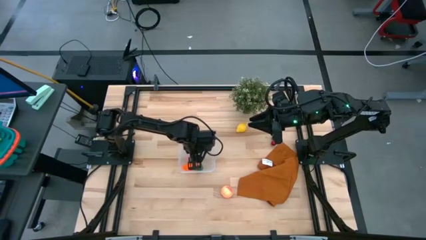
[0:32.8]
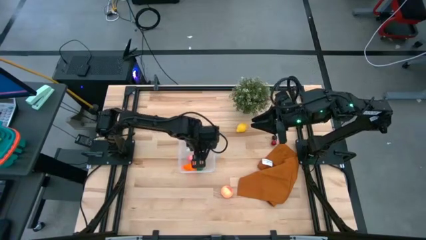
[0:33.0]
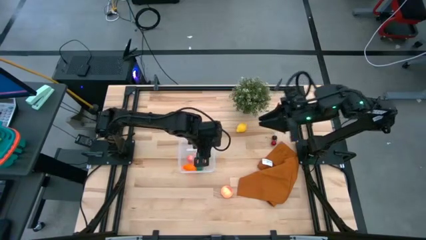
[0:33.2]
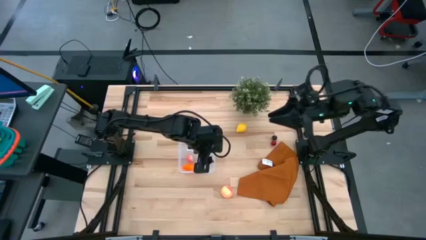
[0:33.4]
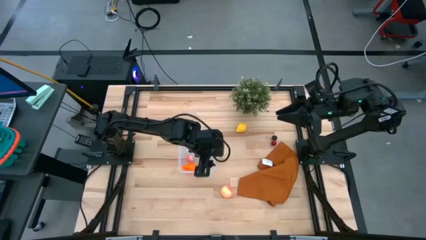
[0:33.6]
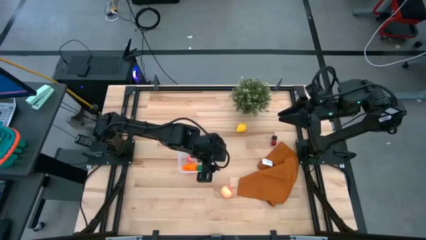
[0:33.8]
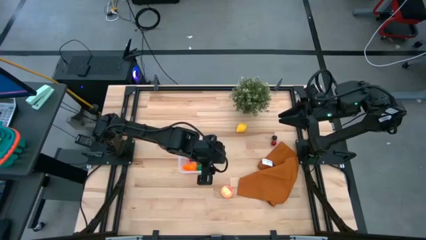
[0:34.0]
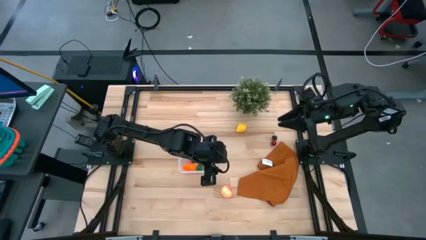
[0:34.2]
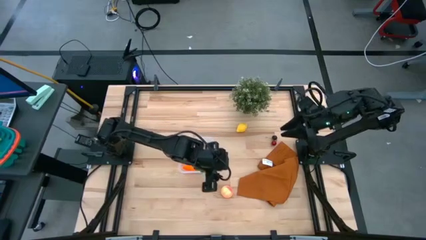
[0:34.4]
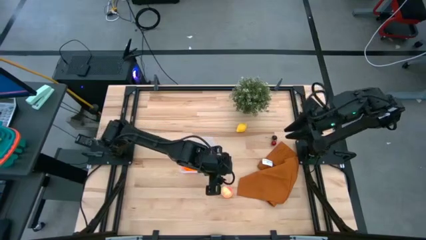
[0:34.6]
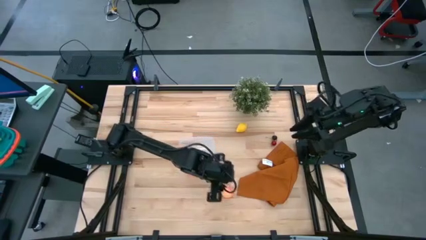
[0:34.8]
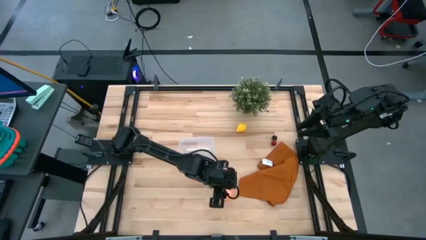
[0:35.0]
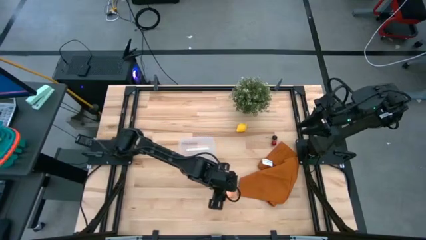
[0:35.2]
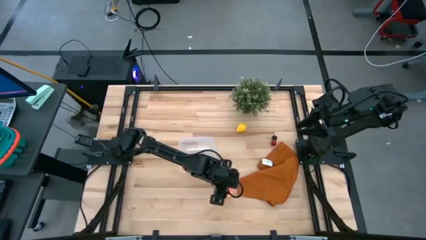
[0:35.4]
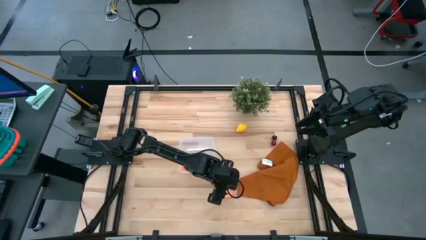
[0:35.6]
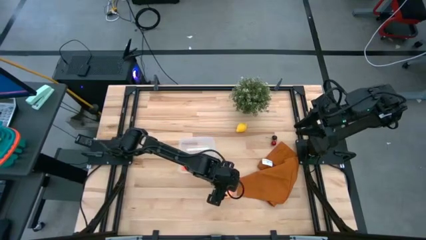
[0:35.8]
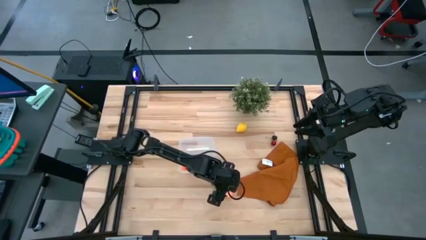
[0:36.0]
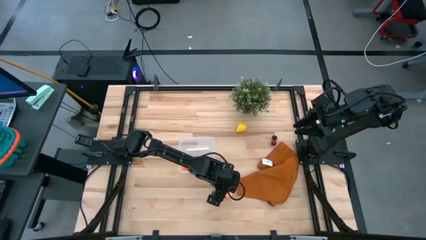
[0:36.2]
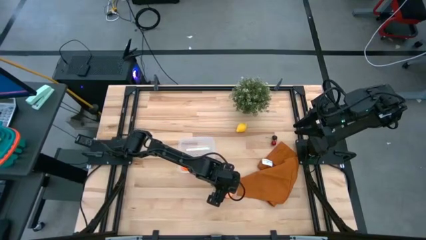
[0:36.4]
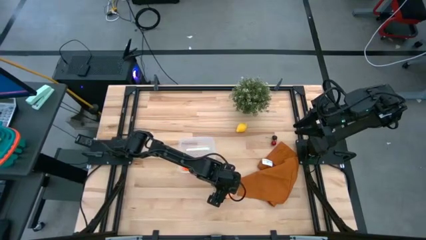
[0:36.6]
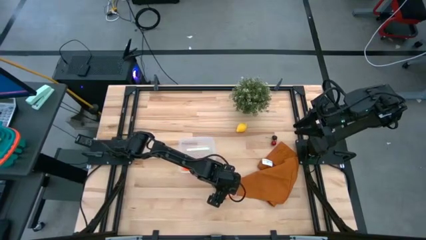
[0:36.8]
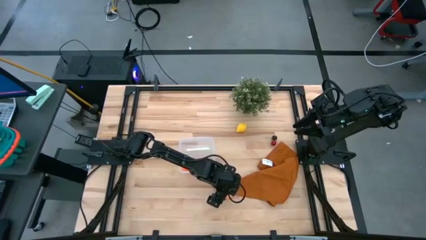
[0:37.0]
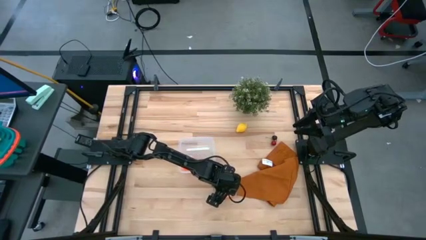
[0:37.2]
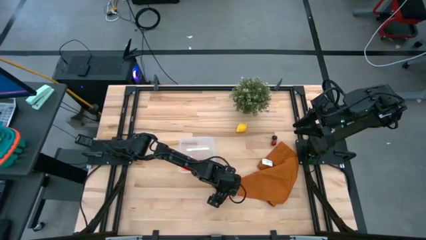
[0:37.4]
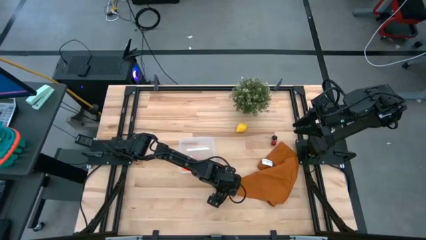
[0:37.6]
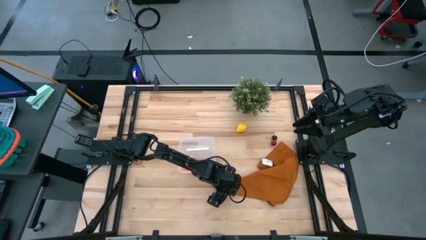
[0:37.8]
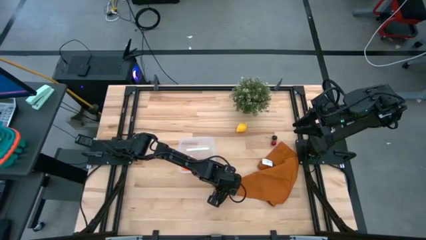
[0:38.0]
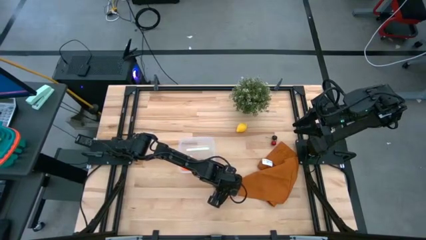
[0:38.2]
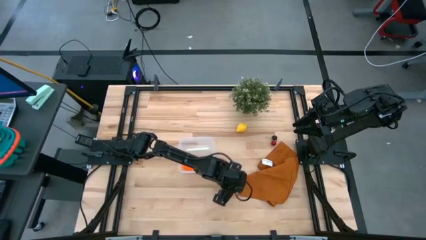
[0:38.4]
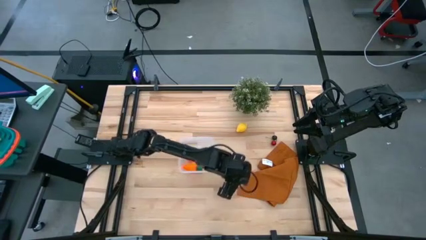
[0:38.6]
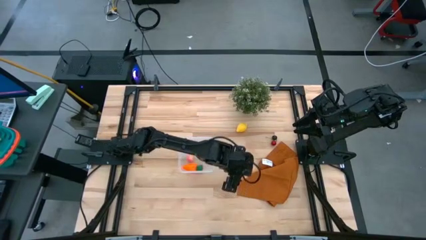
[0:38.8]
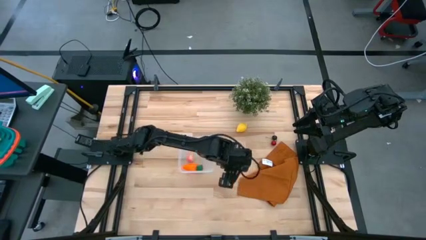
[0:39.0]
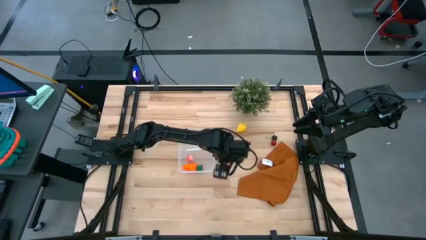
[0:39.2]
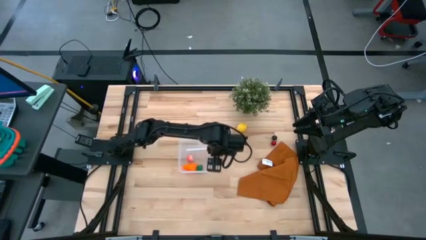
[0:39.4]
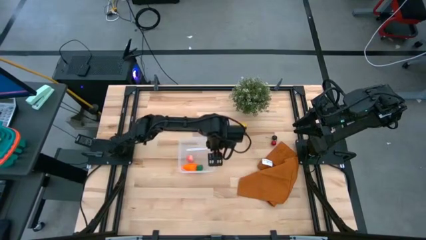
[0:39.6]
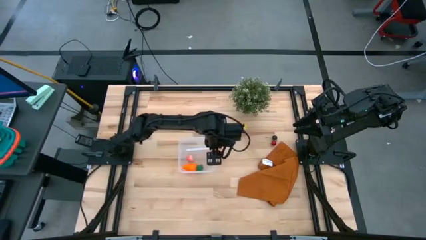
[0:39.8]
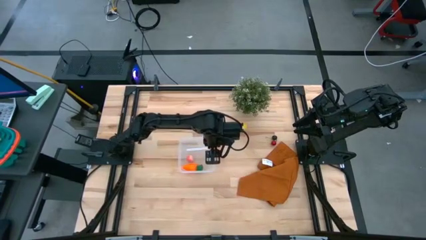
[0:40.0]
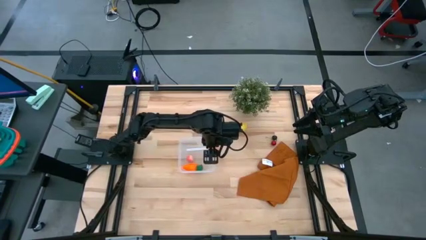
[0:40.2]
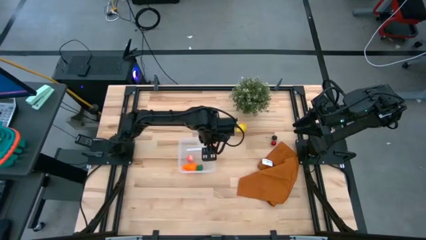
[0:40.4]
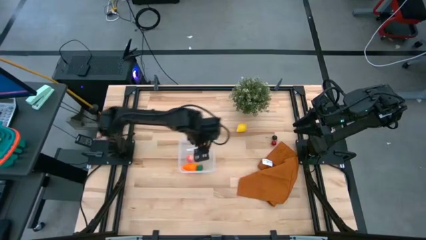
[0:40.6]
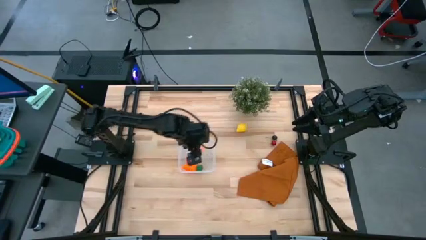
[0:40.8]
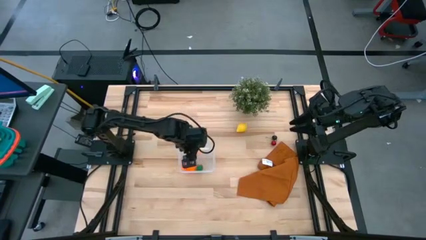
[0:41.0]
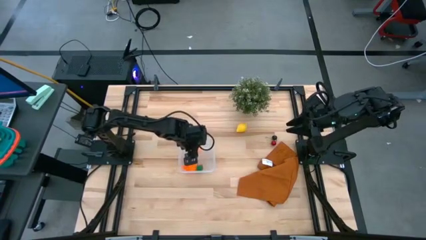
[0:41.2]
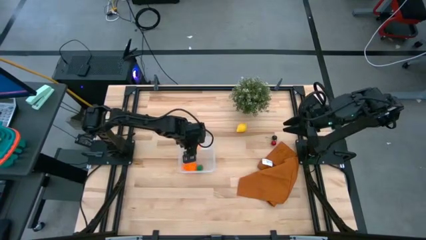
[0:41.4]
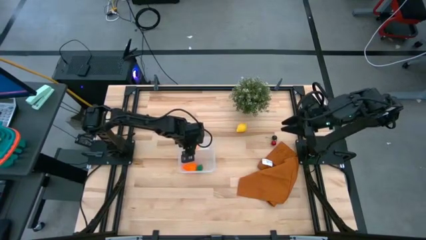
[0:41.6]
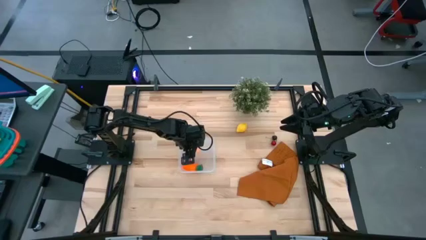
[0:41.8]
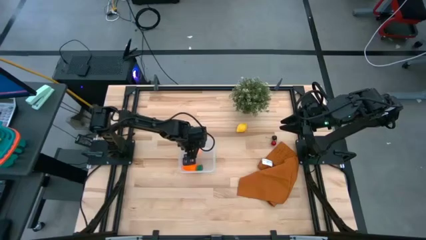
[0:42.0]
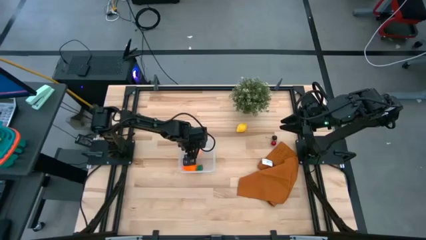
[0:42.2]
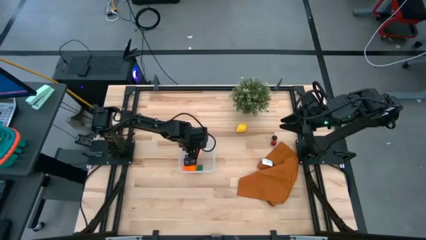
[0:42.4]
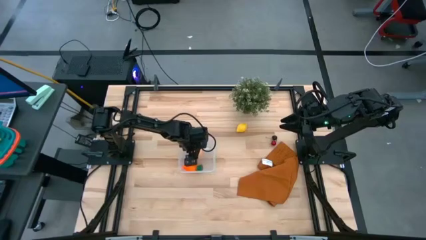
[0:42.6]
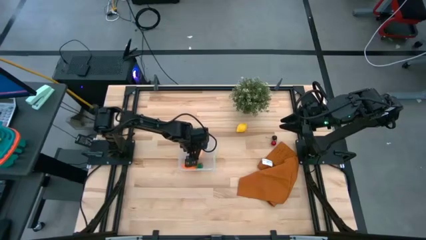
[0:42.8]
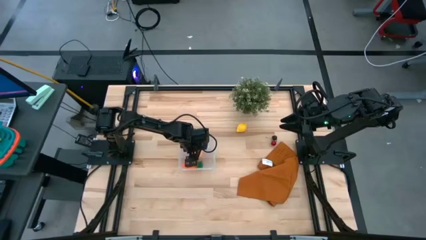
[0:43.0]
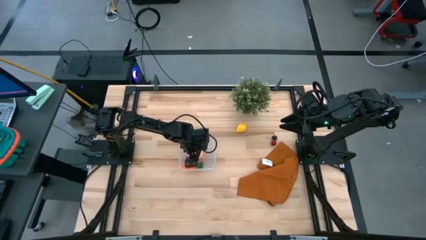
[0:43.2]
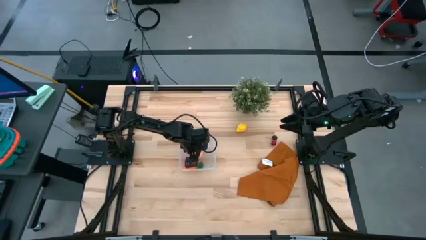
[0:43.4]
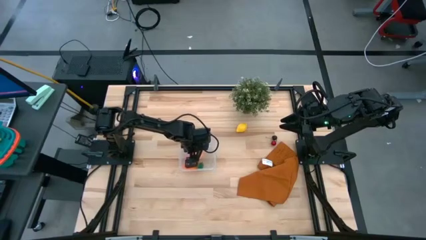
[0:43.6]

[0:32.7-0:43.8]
Task: Pick and placing Produce into tupperware
Put the orange peach into the transparent bin
